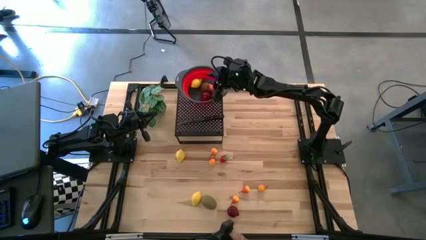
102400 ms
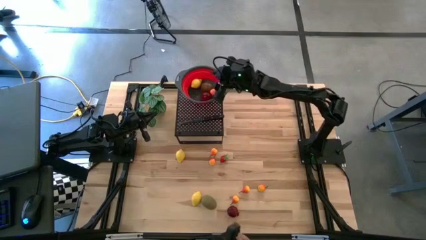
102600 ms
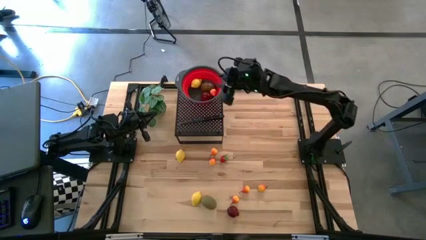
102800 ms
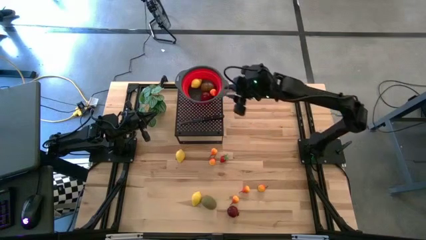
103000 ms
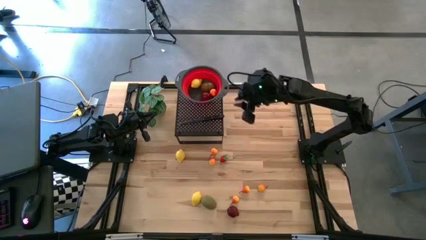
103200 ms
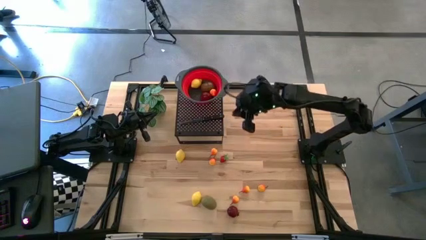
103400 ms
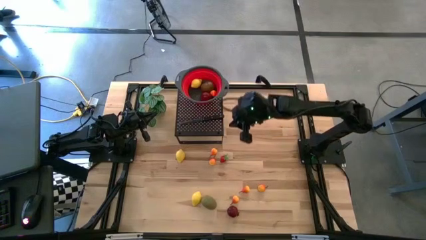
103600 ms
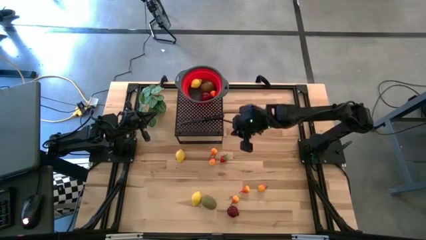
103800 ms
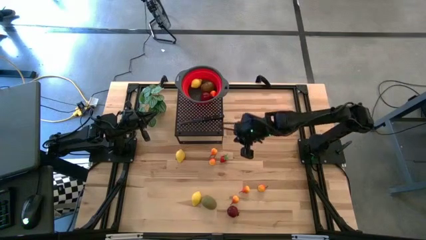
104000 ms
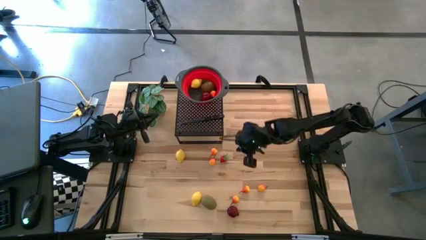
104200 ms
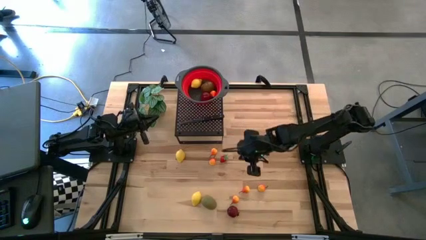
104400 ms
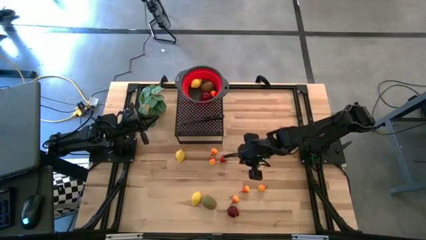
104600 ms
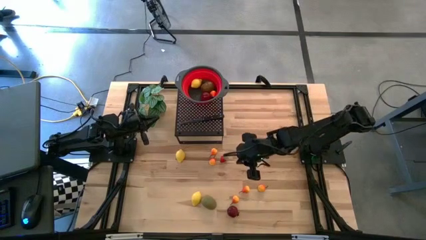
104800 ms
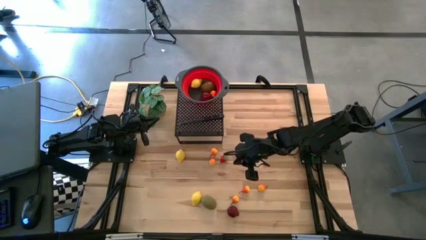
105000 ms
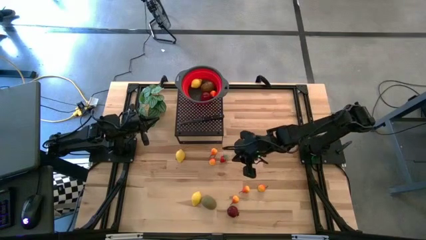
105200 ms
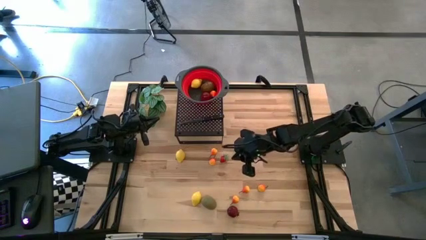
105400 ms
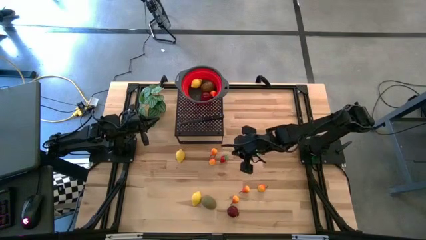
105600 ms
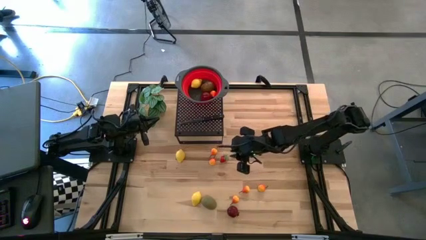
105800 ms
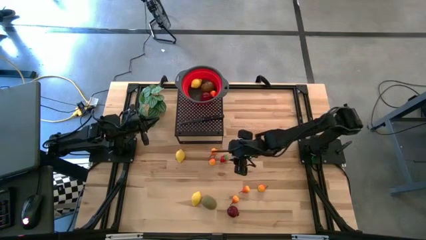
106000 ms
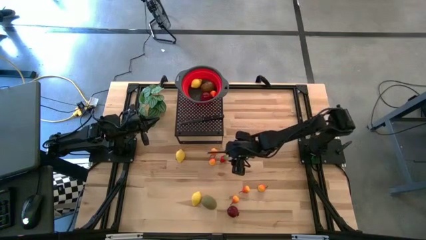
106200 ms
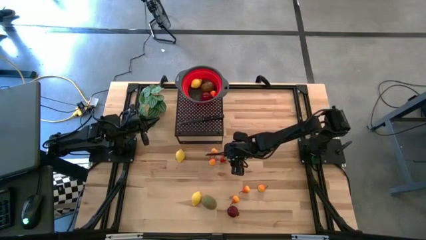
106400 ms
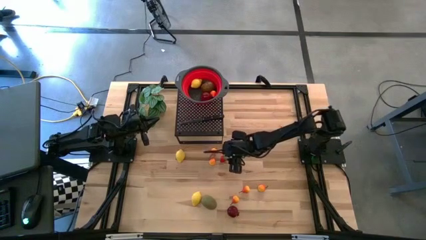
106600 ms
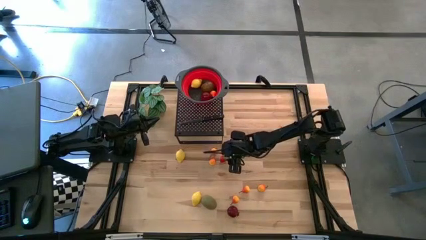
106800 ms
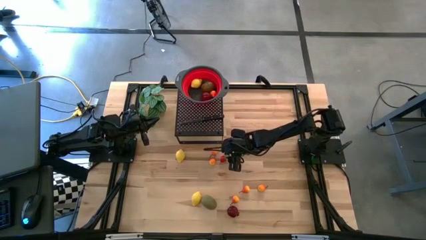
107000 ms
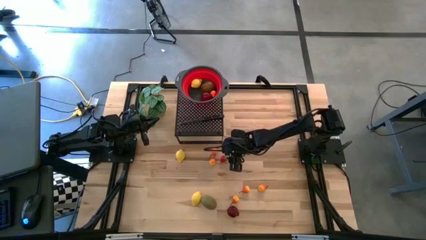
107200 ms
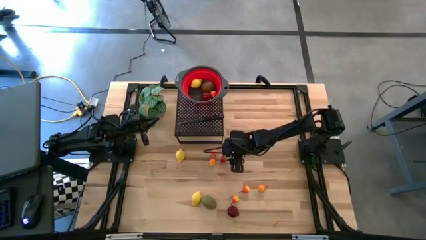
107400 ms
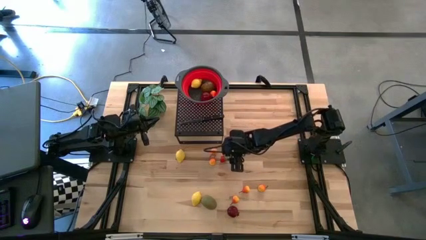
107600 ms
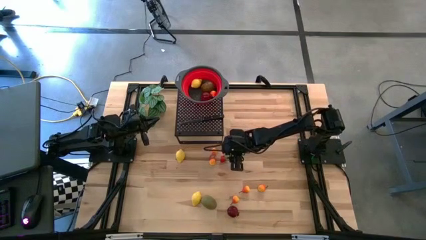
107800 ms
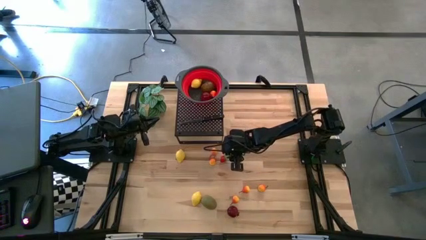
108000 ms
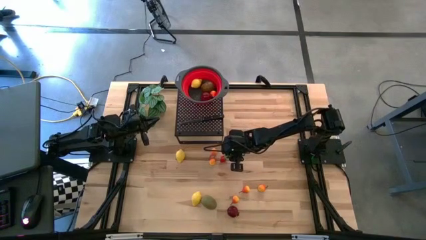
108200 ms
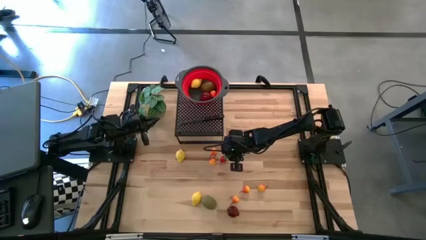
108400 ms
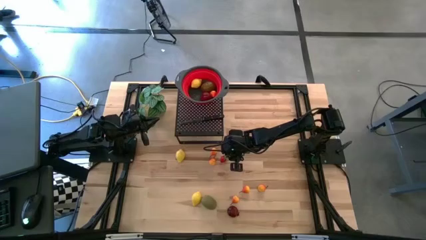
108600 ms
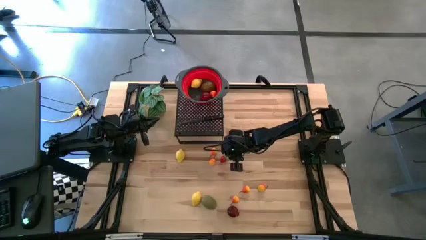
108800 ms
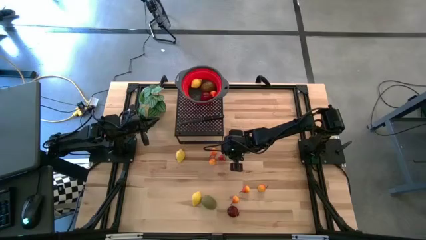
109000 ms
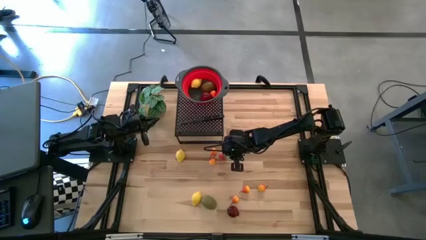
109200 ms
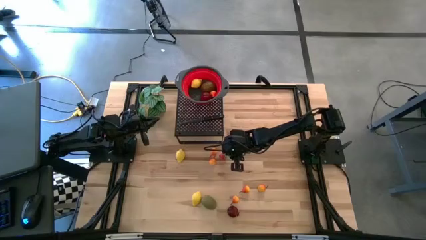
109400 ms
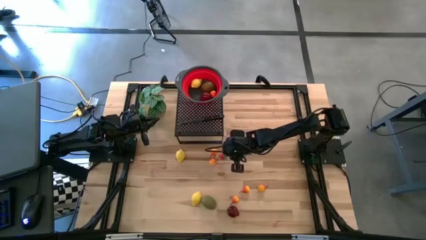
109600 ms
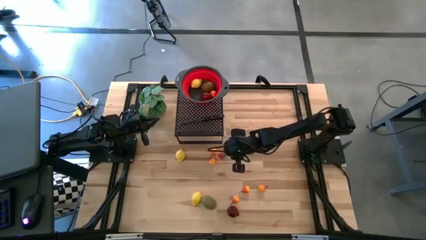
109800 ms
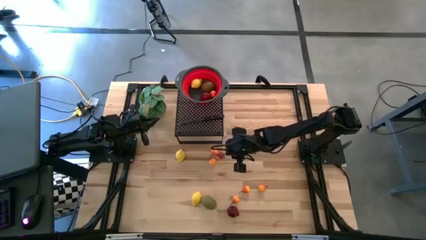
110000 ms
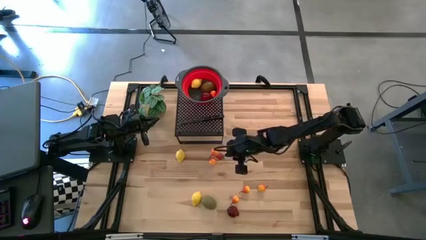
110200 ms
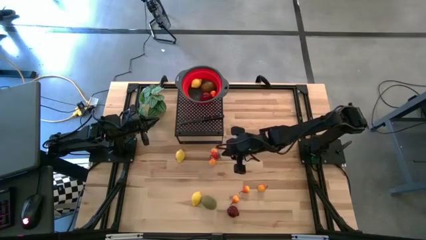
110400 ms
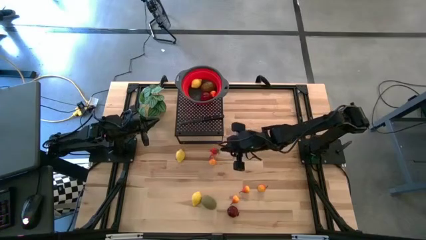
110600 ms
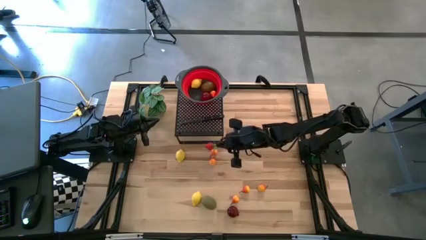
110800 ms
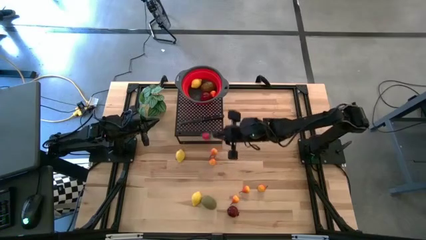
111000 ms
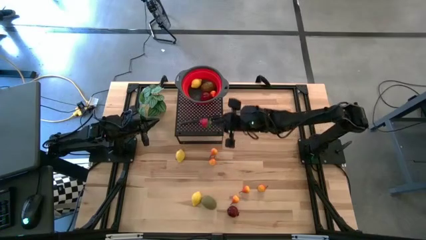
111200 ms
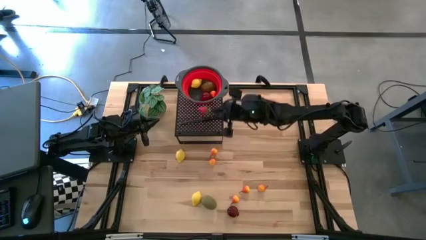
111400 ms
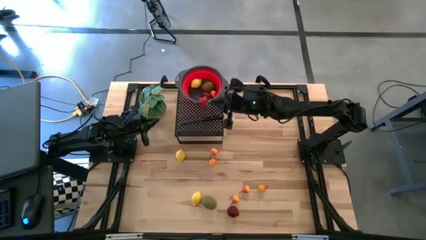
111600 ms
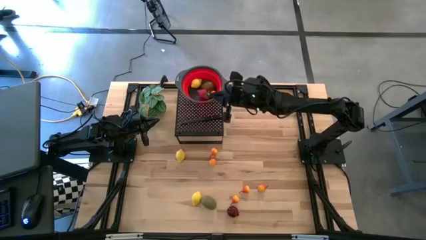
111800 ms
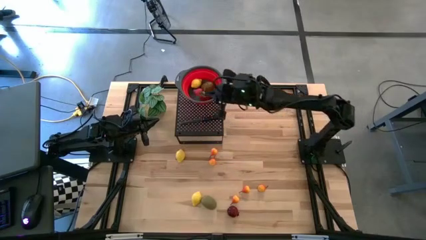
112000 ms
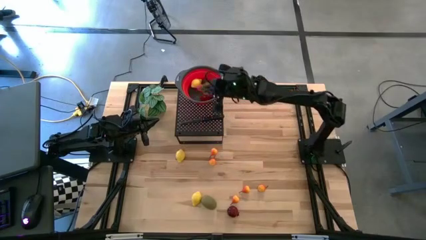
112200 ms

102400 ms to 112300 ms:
Task: Pick & Place Fruit
Put the strawberry into the red strainer bowl

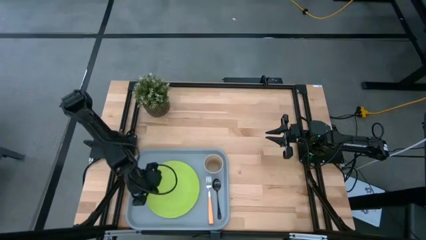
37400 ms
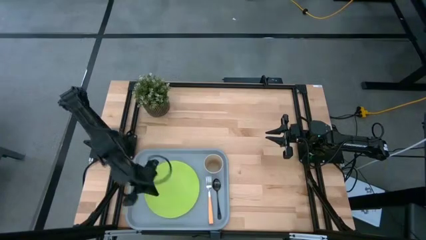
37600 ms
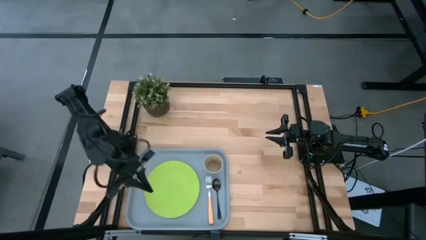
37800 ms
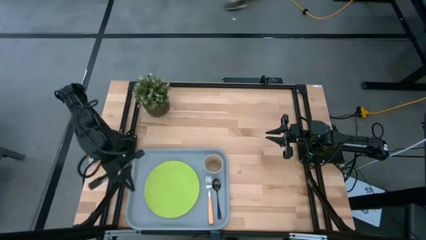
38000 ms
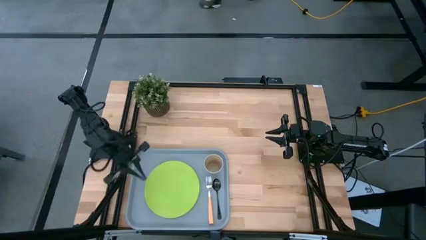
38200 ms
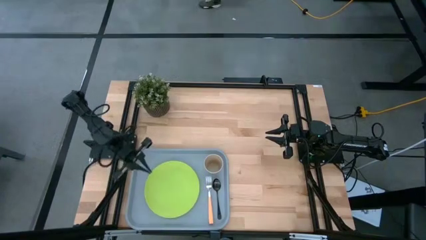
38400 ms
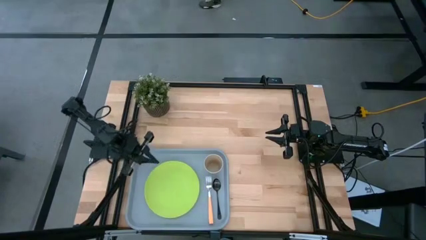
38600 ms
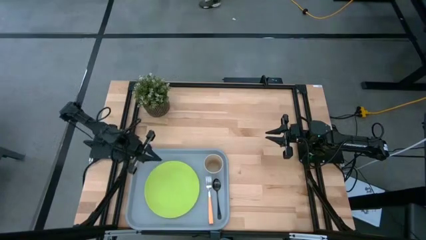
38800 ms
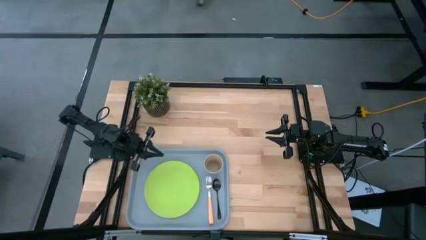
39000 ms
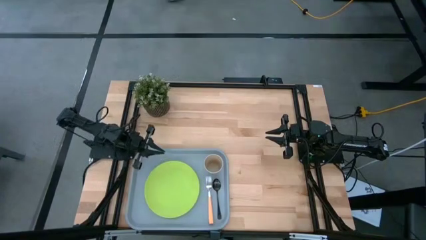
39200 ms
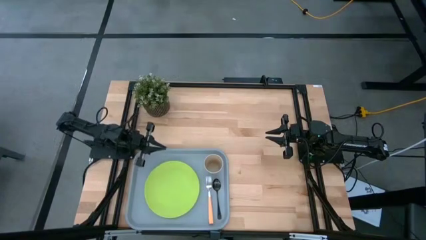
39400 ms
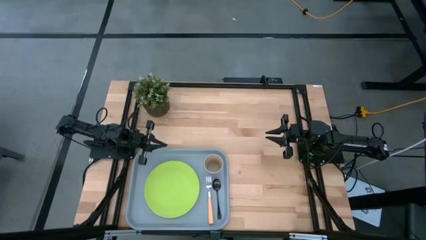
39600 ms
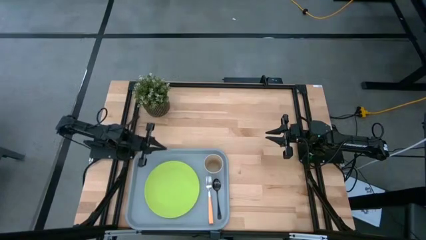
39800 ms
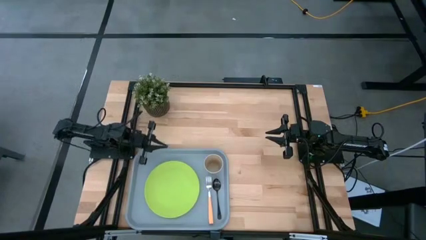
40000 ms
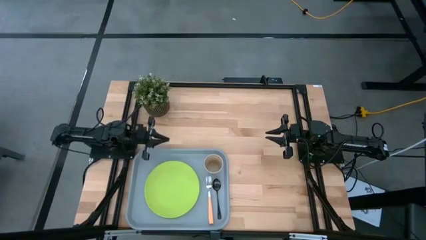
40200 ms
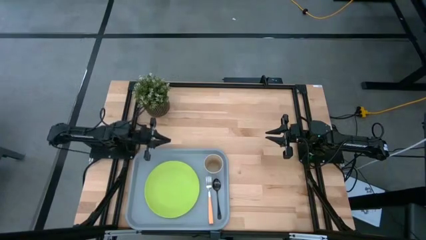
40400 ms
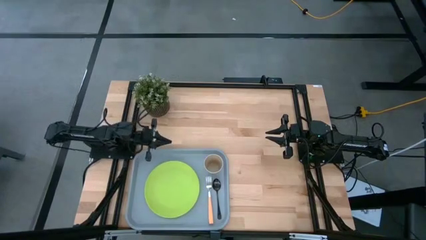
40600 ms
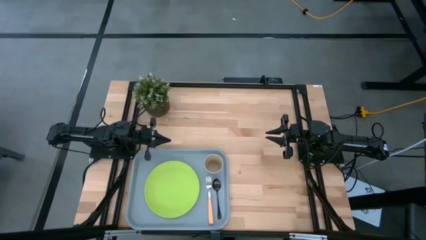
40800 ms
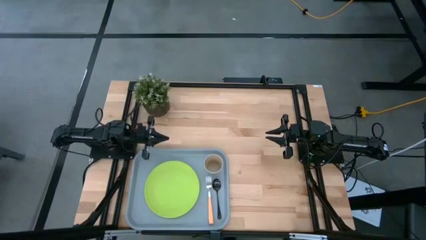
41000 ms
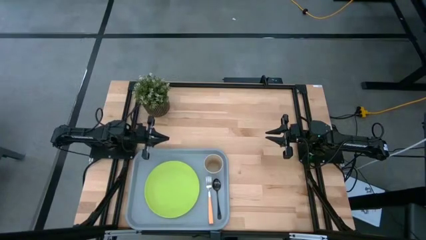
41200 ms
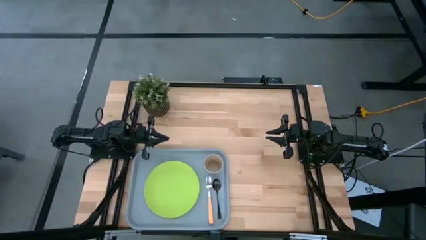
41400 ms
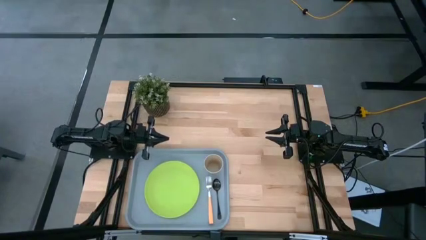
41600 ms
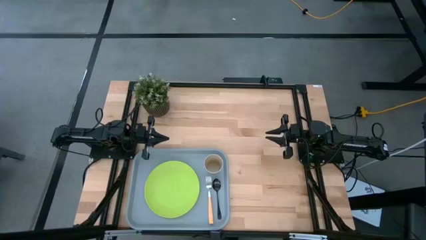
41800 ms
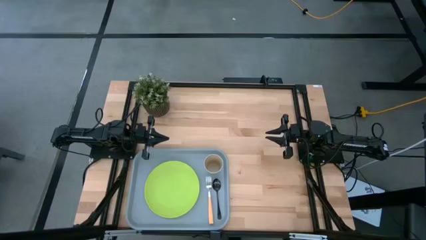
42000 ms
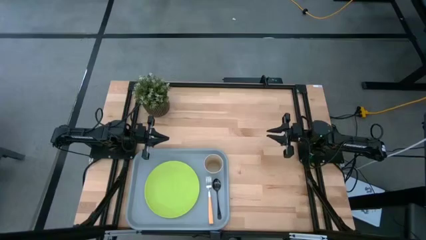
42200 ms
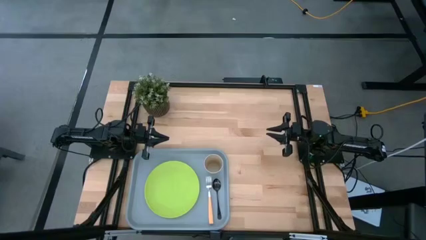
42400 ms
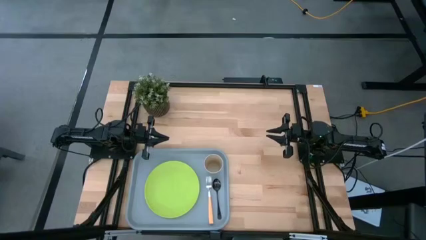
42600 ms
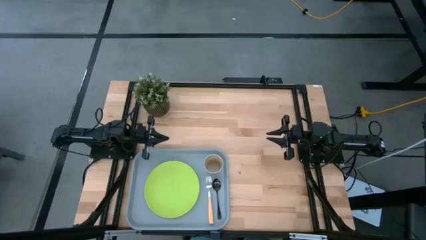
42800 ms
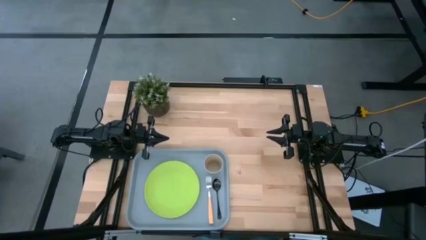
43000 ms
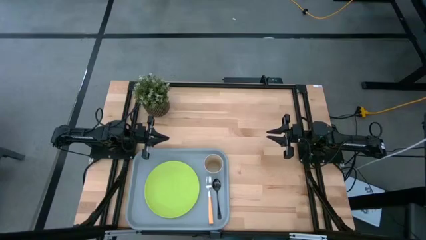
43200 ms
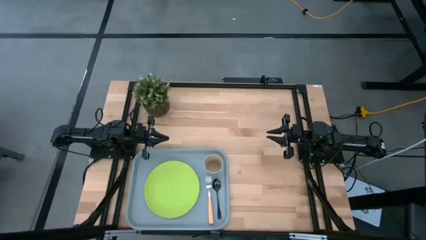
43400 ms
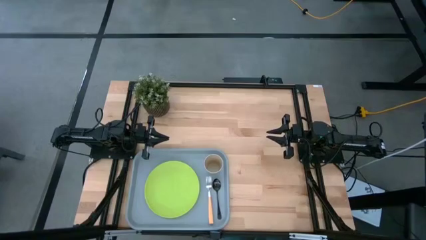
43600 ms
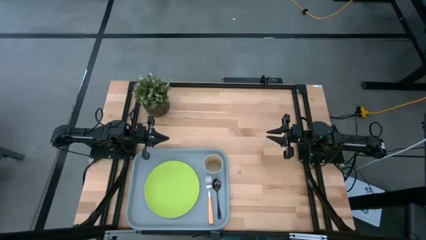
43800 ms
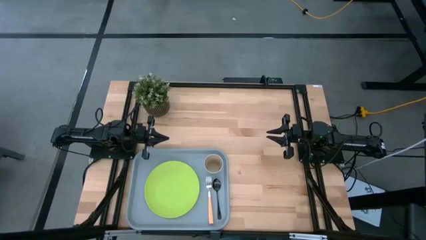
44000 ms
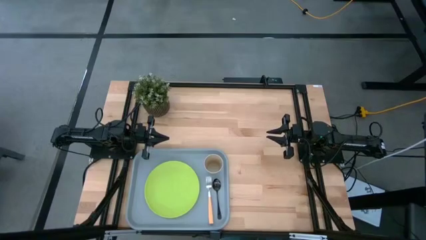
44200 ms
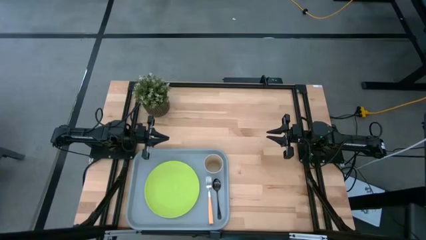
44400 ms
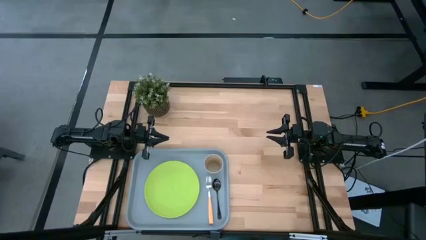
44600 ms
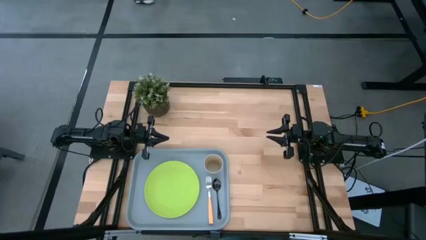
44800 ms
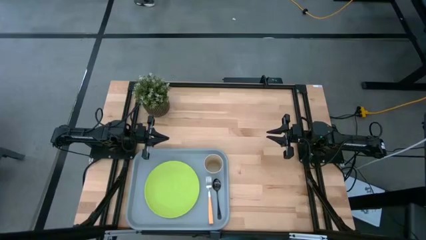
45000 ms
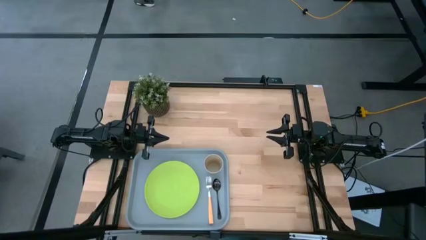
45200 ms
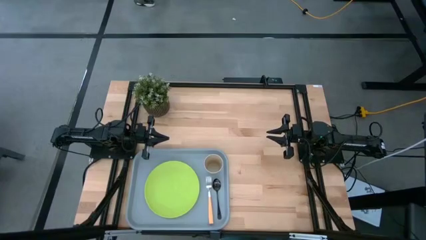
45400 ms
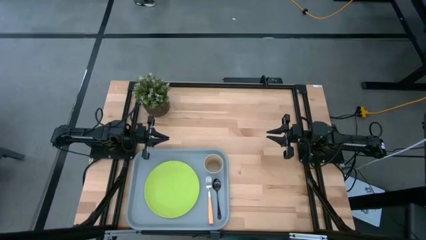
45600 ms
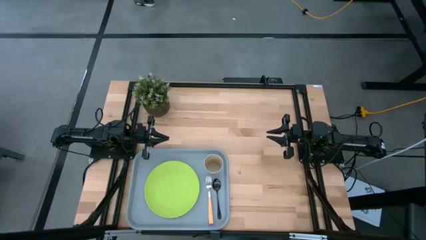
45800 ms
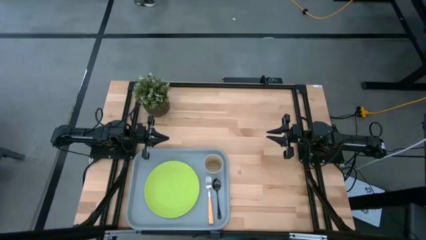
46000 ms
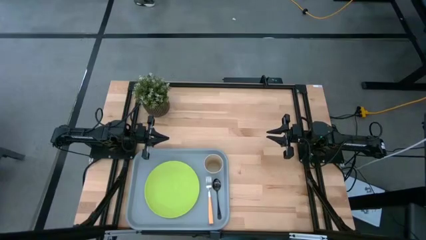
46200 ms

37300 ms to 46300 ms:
Task: Pick and place plate/cup/fork/spoon on tray
Return to Home Position
